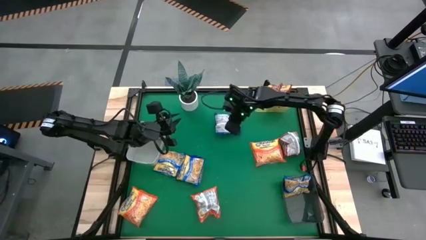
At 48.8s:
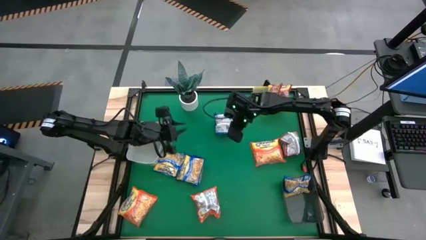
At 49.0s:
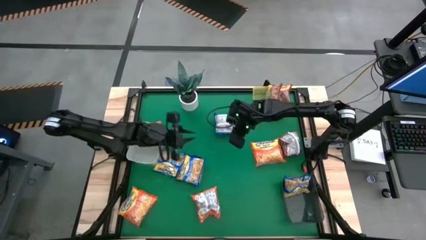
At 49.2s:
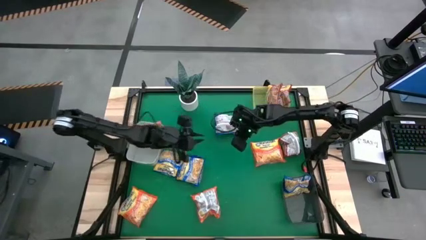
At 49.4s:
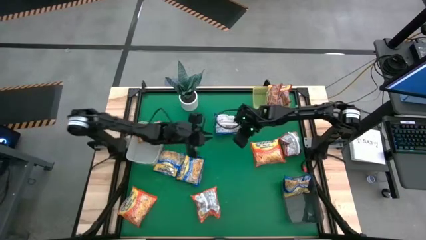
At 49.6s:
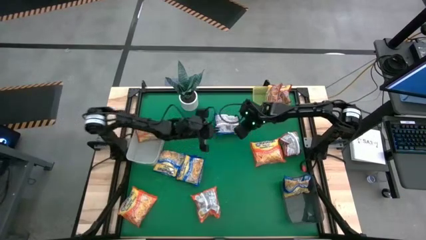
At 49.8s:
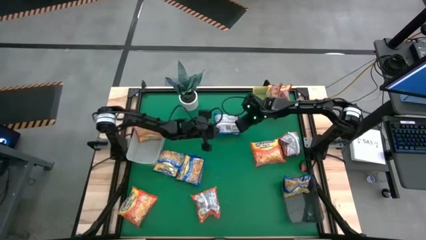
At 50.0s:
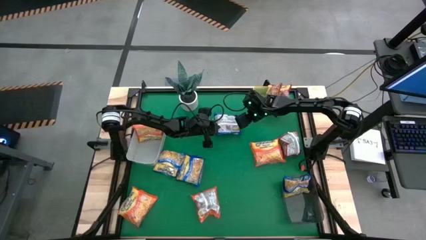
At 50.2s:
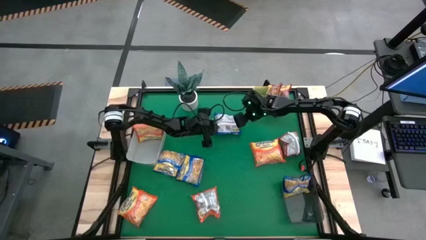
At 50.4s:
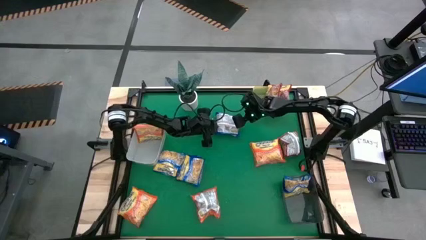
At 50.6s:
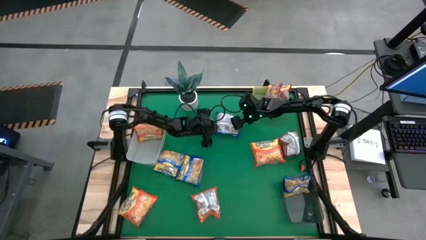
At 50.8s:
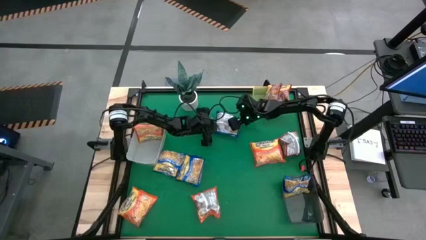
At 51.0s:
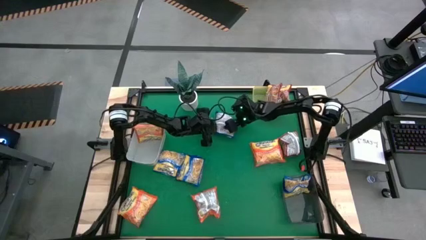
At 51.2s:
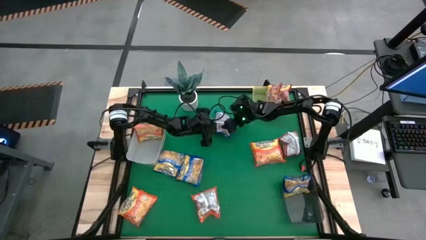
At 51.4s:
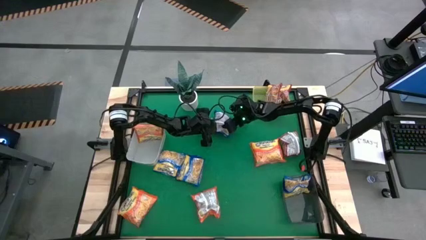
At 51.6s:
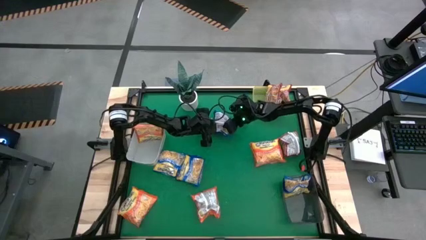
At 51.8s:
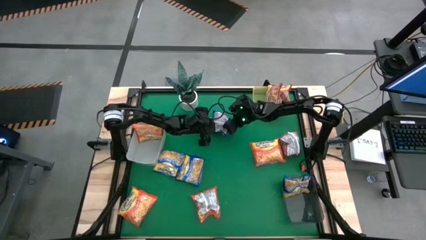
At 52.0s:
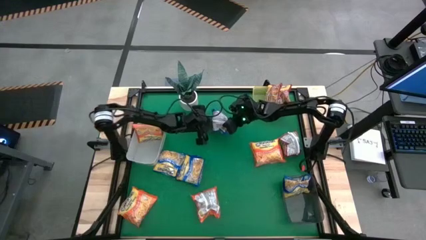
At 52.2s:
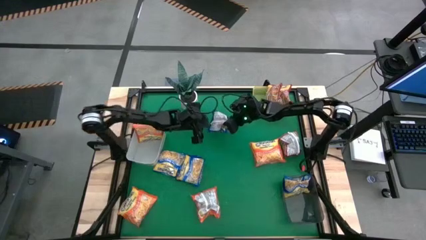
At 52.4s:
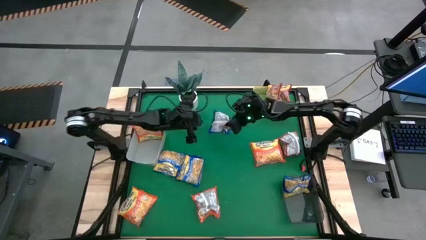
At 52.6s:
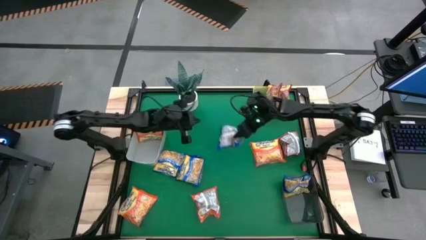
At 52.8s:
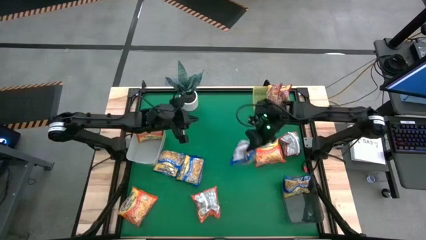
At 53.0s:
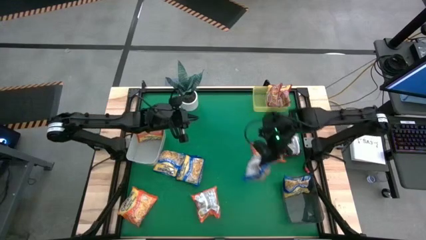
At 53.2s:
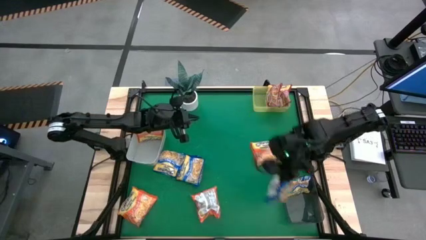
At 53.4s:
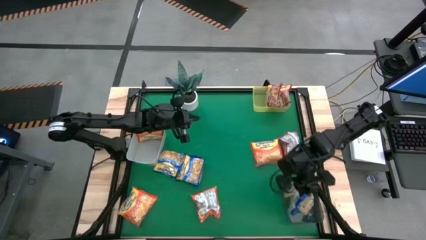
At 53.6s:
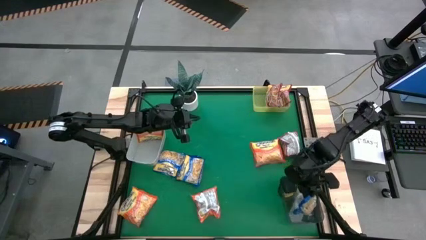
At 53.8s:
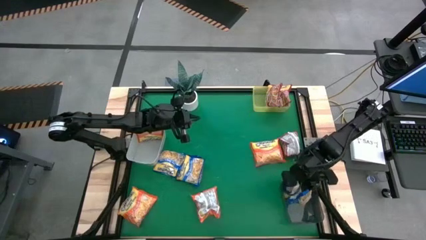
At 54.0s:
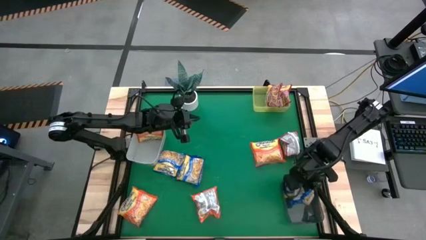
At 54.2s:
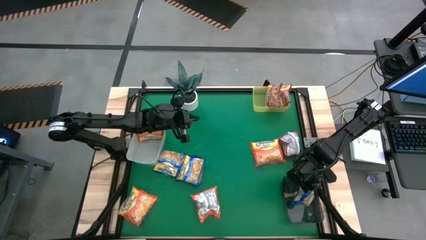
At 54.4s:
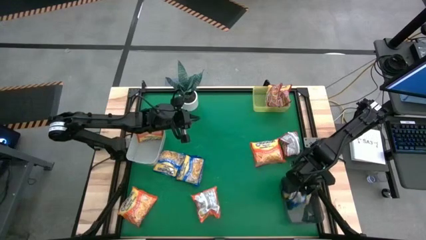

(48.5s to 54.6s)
Task: Sort Maruchan noodles
Put the blue noodle pack into the black bin

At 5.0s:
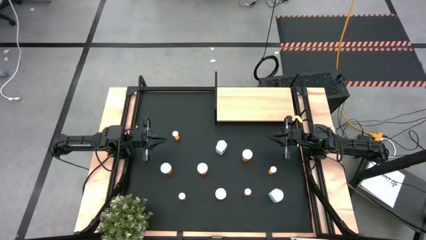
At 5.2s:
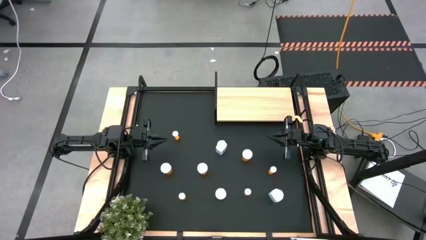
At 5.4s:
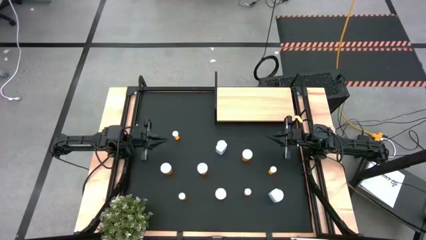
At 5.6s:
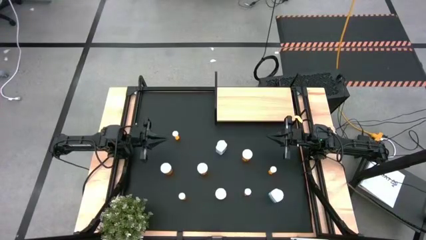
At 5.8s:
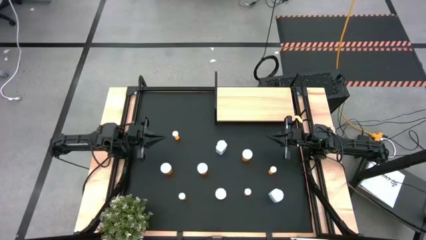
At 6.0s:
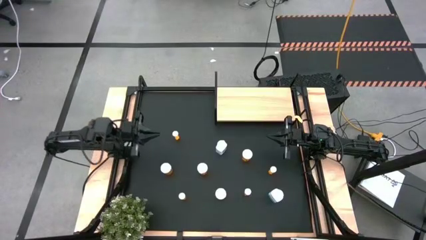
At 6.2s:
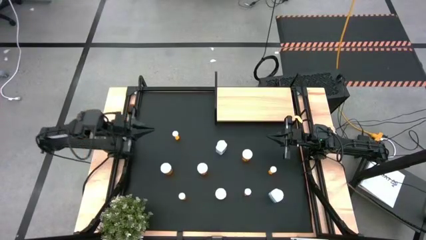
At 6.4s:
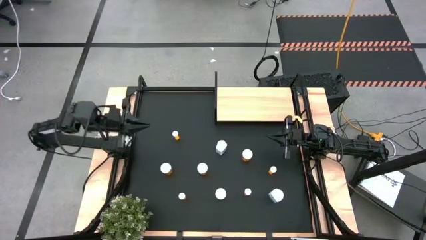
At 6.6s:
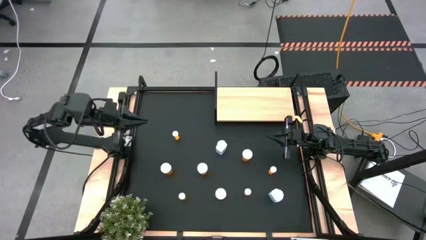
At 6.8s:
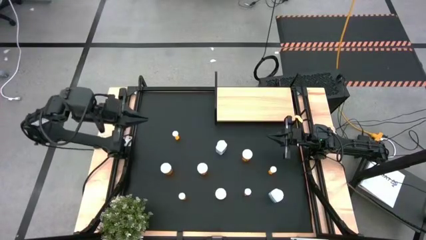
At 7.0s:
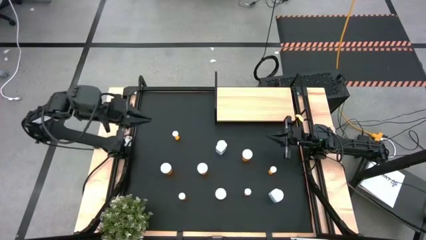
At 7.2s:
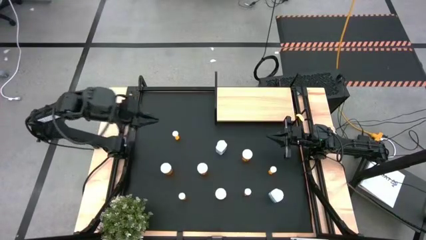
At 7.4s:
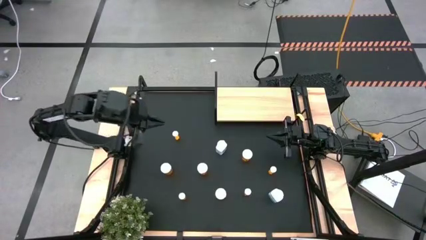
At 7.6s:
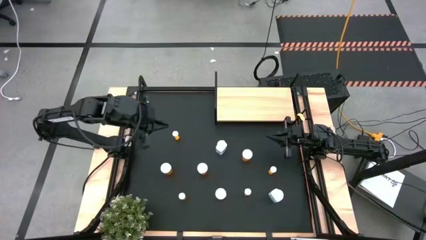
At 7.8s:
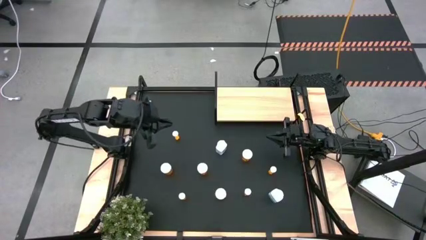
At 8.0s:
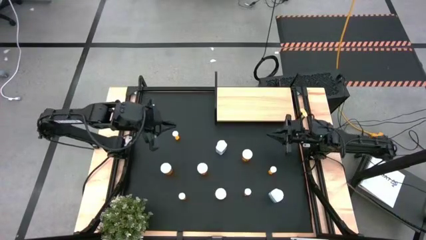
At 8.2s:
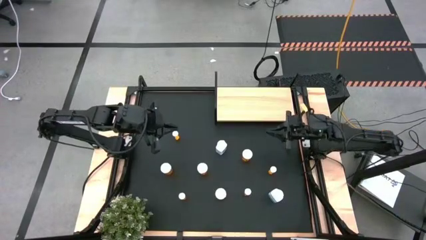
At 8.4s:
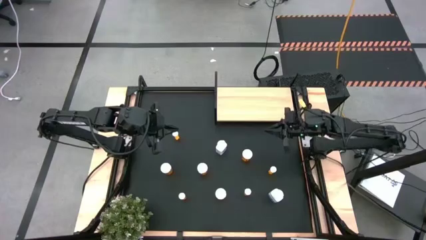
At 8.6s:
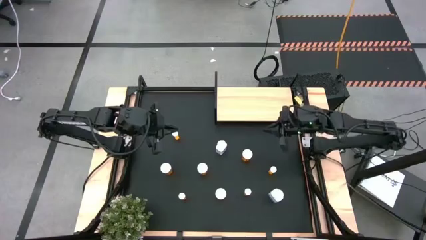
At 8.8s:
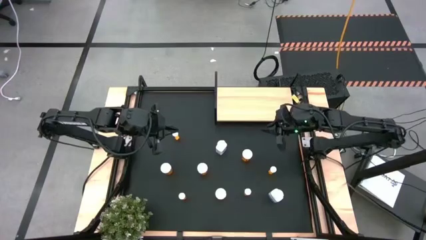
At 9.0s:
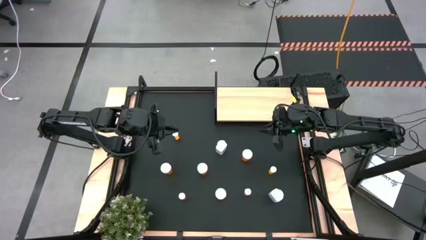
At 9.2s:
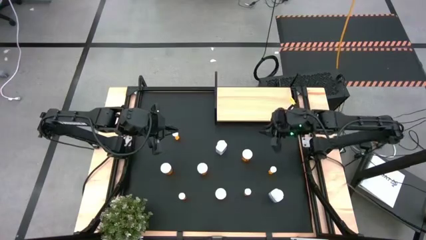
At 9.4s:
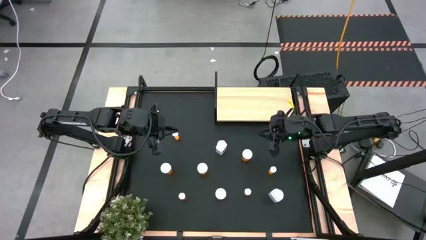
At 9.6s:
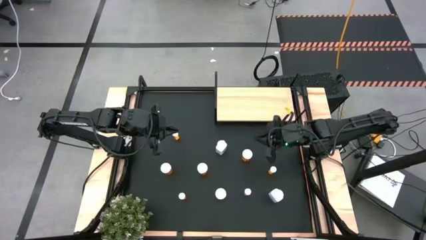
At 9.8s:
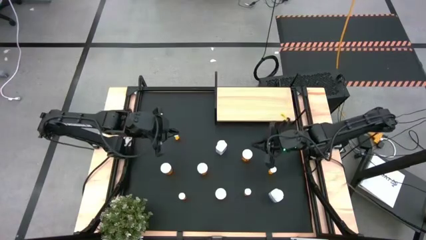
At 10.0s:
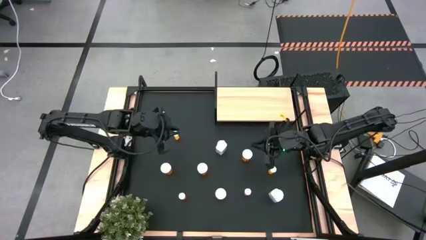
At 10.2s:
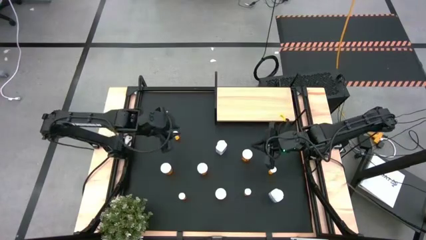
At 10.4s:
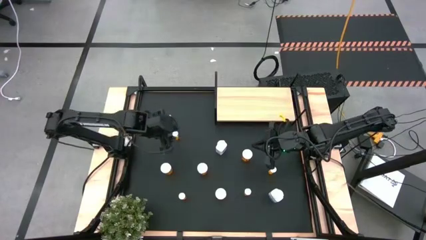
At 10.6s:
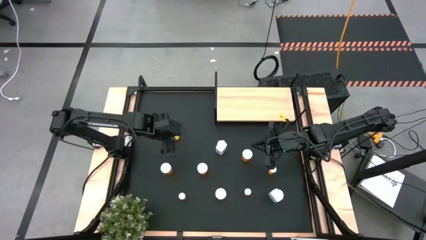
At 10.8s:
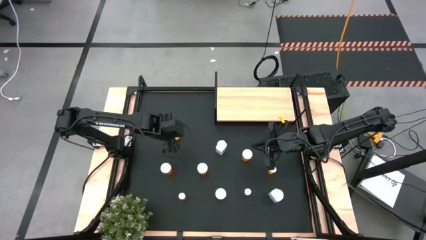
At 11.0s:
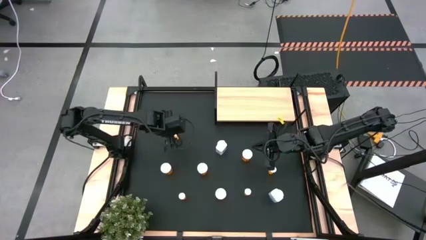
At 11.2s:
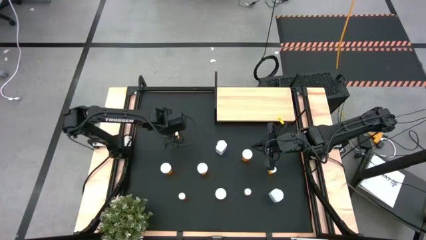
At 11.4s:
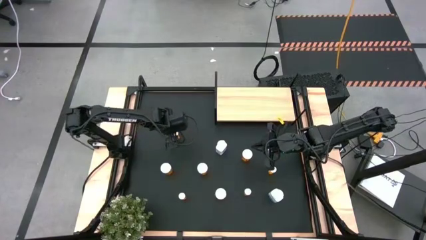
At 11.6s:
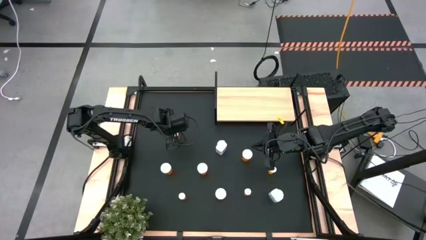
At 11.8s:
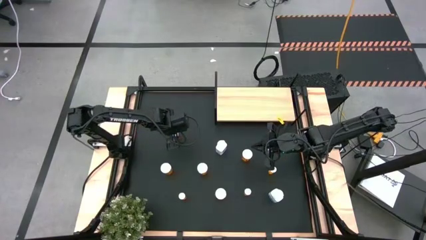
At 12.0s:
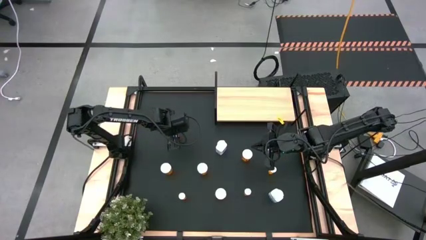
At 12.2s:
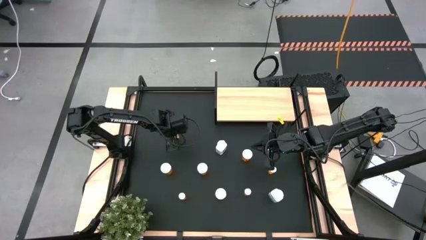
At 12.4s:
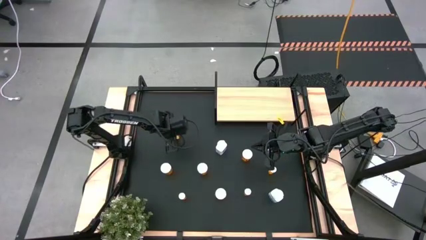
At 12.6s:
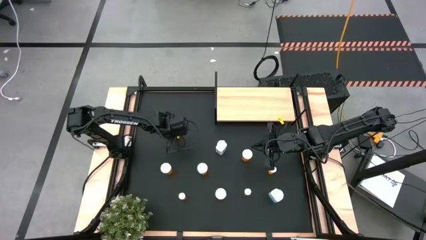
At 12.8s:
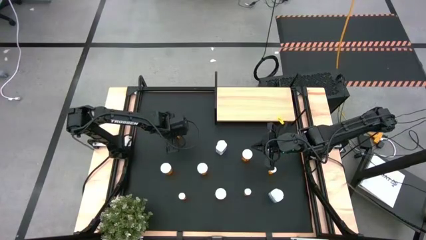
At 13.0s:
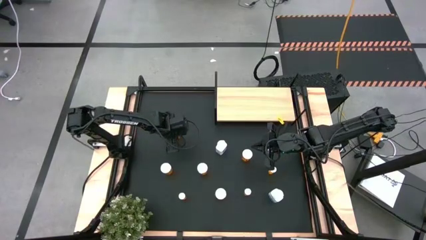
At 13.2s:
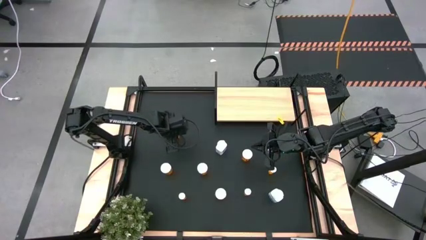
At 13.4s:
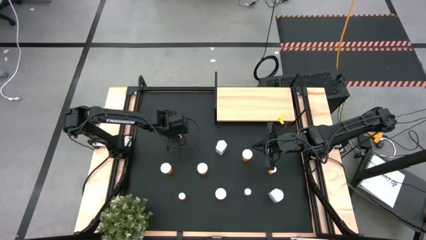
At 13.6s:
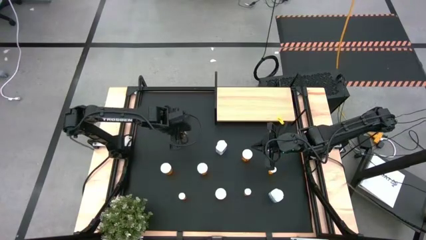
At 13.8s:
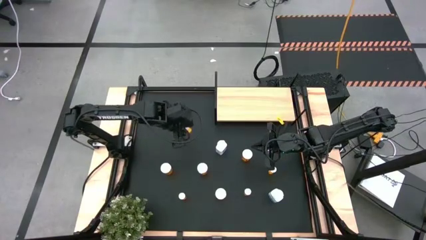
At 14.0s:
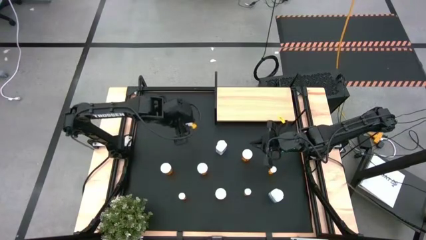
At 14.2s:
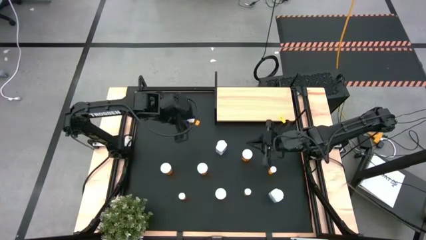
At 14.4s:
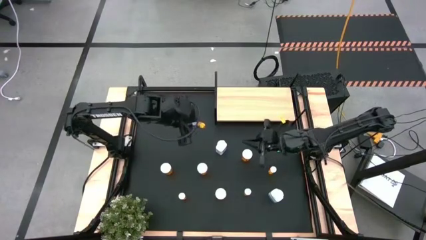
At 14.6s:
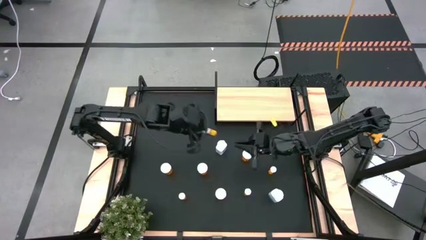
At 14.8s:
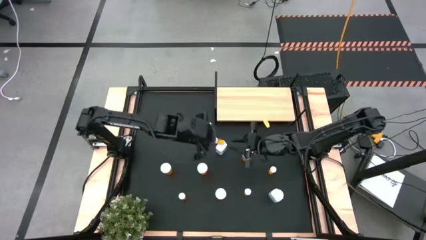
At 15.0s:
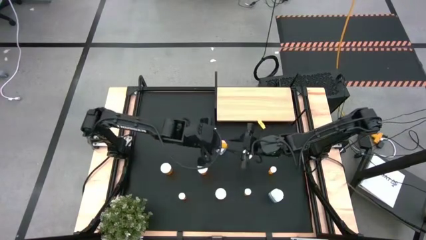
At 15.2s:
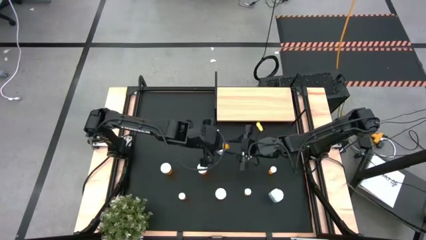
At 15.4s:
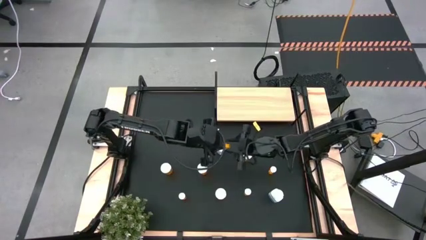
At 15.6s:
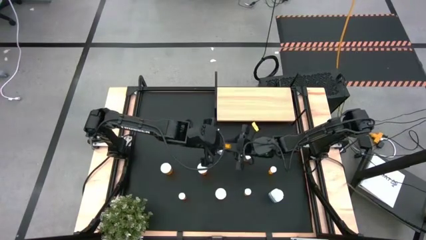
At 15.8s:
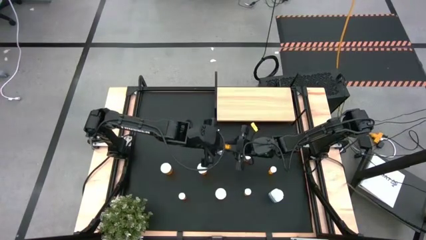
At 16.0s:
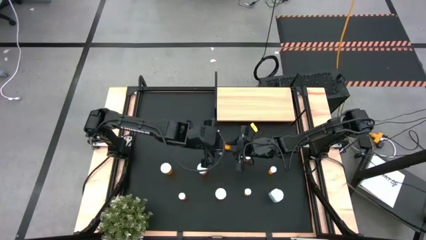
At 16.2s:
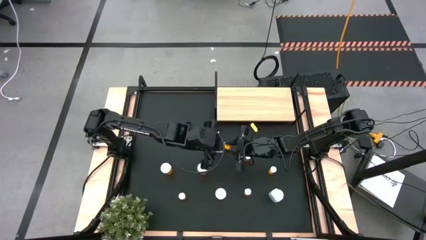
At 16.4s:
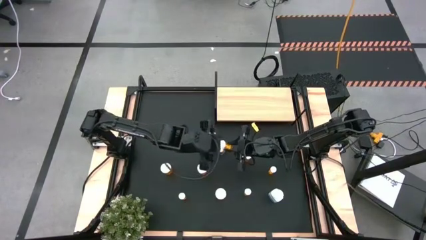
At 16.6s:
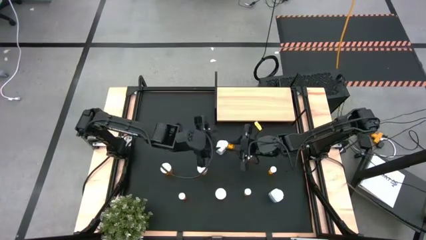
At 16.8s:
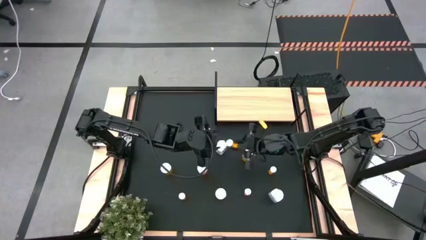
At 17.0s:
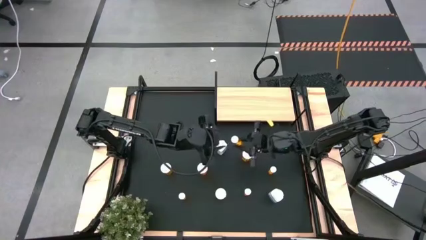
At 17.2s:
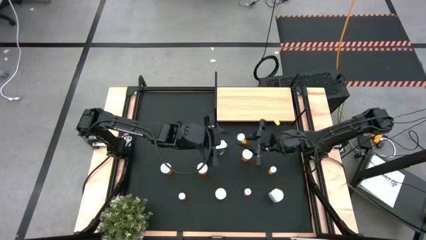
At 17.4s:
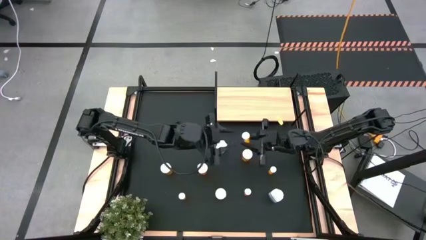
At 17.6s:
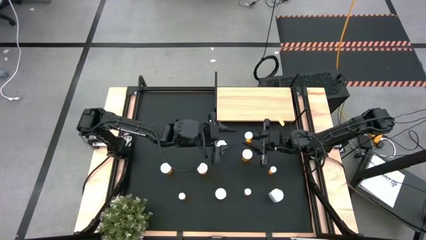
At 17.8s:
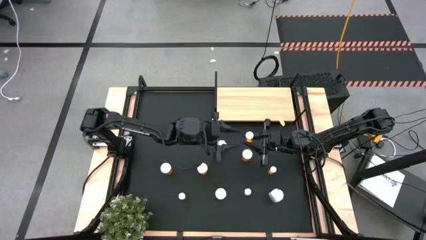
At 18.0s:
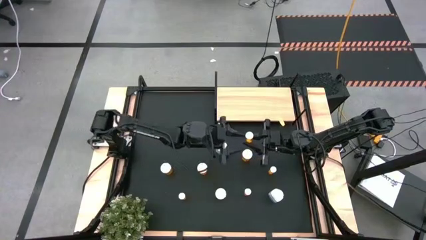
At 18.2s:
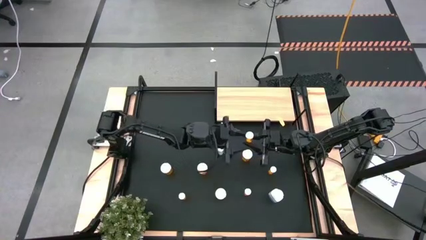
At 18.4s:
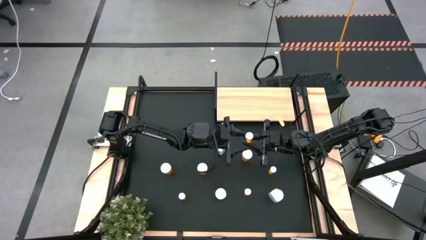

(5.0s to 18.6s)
Task: Pick and place medicine bottles onto shelf by color
Put the small orange pill bottle on the shelf
